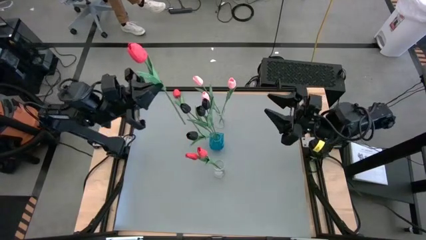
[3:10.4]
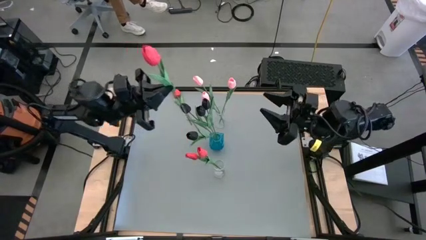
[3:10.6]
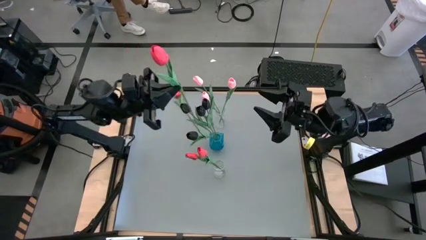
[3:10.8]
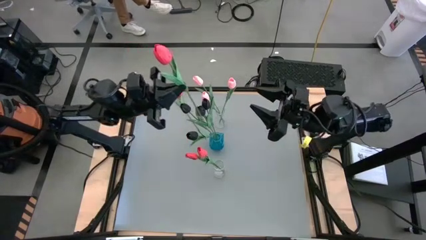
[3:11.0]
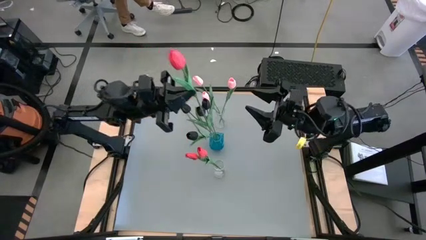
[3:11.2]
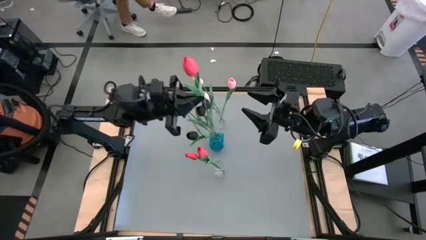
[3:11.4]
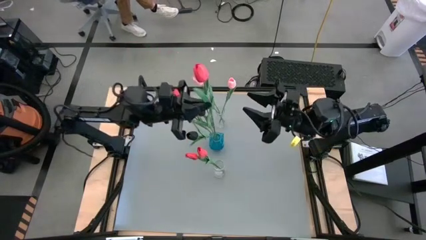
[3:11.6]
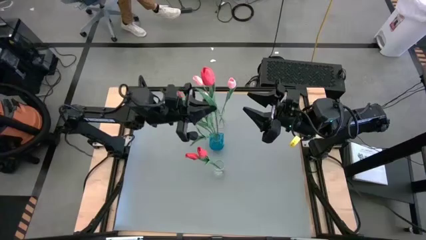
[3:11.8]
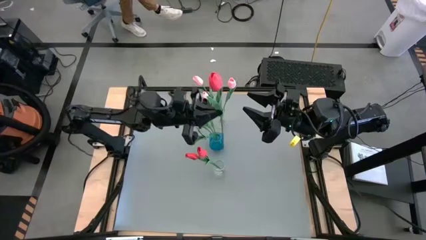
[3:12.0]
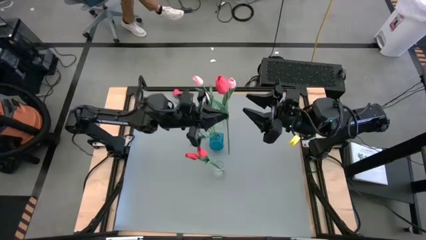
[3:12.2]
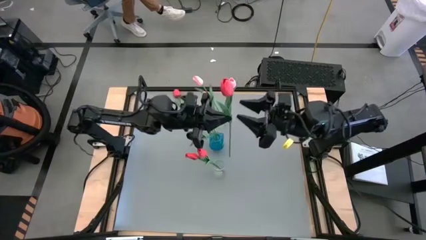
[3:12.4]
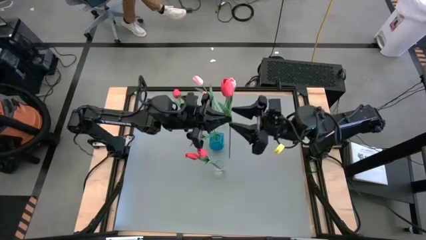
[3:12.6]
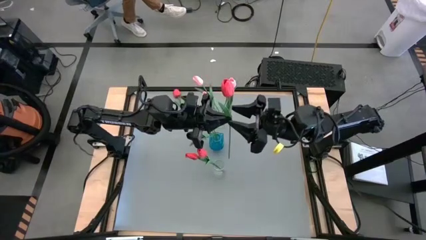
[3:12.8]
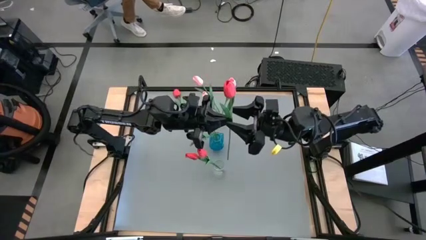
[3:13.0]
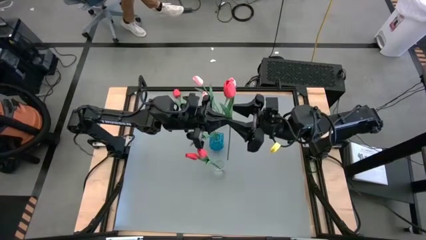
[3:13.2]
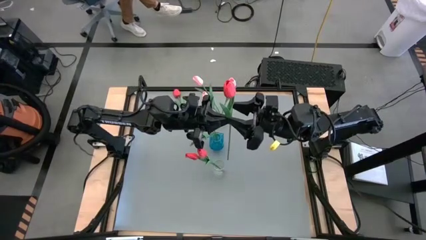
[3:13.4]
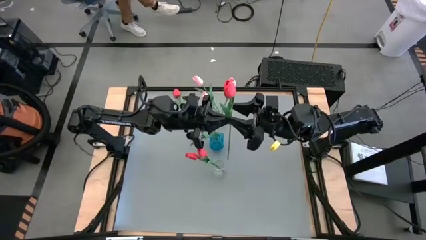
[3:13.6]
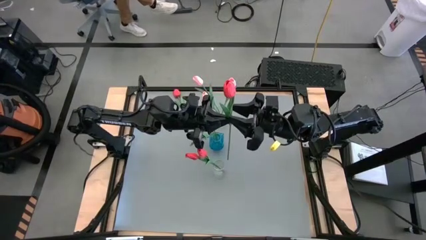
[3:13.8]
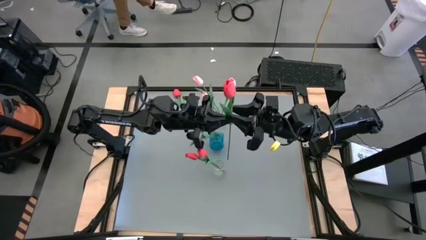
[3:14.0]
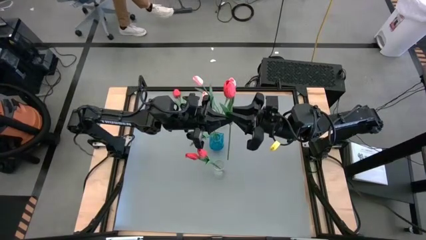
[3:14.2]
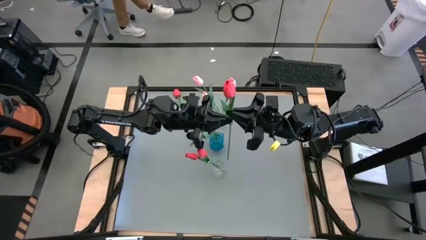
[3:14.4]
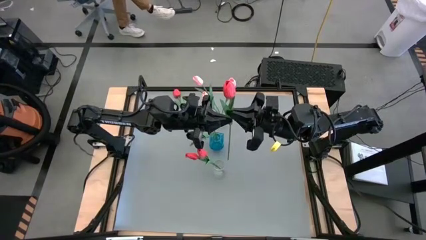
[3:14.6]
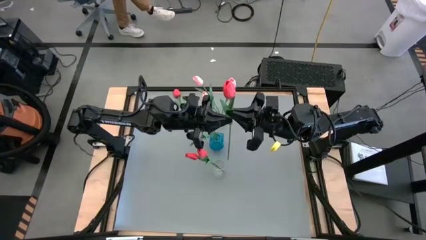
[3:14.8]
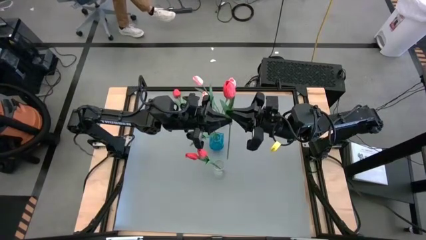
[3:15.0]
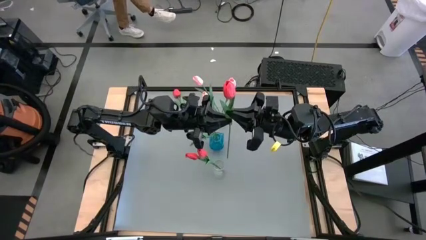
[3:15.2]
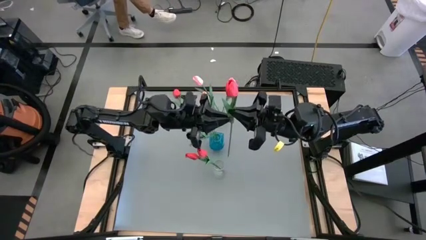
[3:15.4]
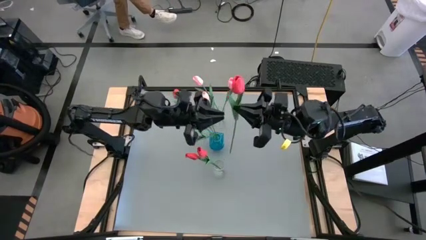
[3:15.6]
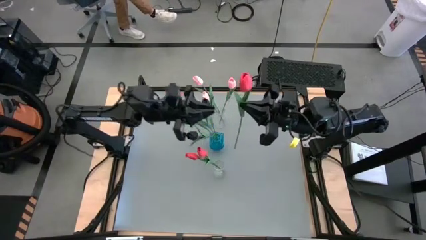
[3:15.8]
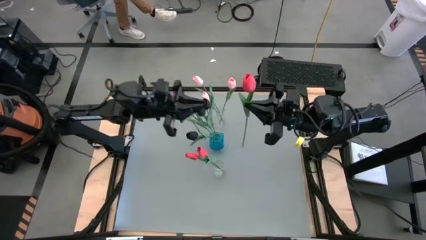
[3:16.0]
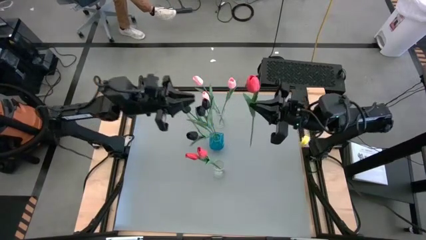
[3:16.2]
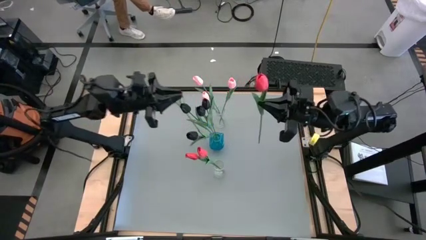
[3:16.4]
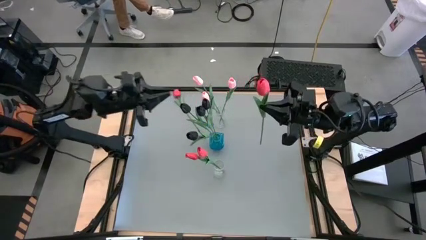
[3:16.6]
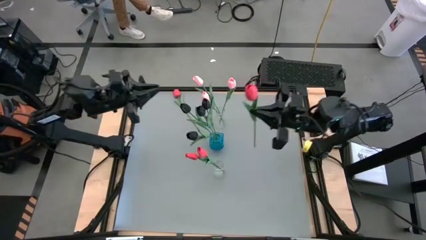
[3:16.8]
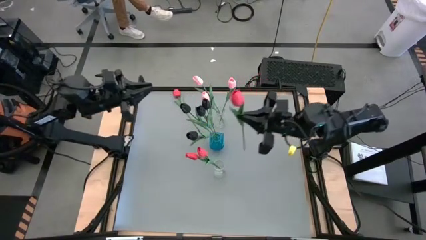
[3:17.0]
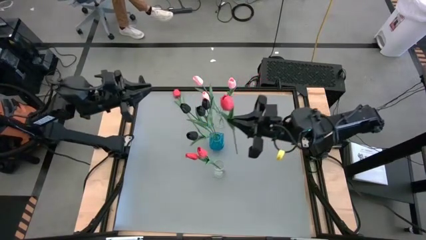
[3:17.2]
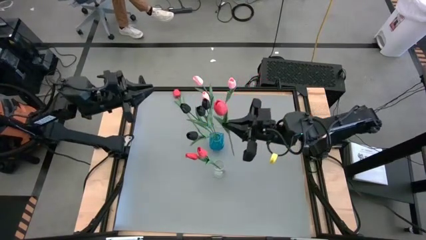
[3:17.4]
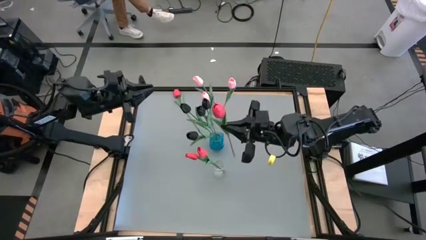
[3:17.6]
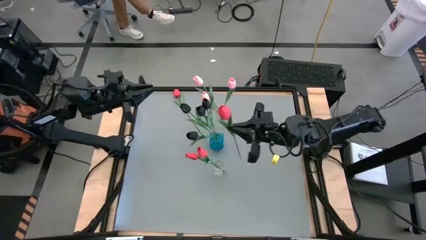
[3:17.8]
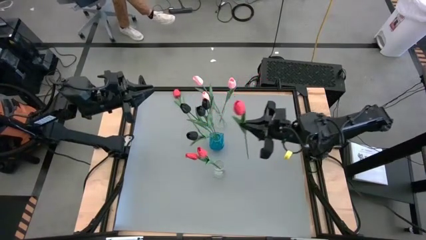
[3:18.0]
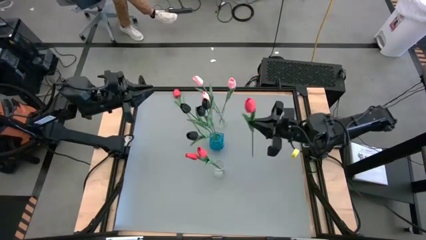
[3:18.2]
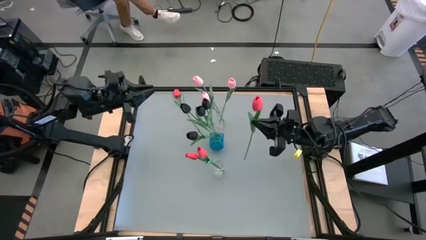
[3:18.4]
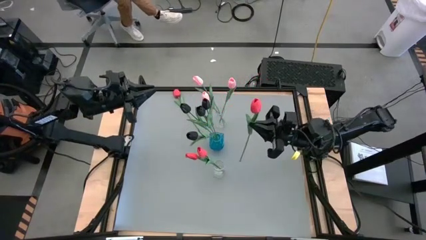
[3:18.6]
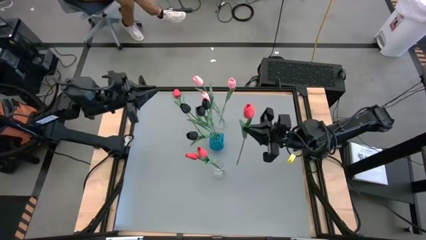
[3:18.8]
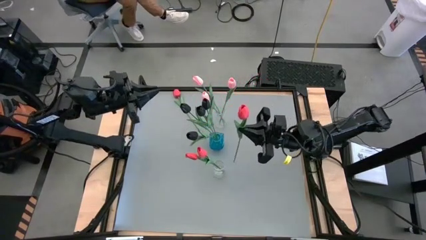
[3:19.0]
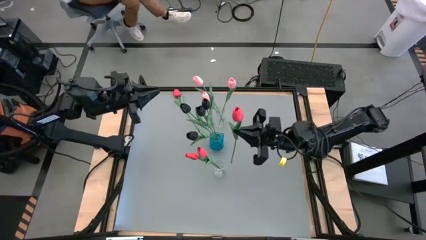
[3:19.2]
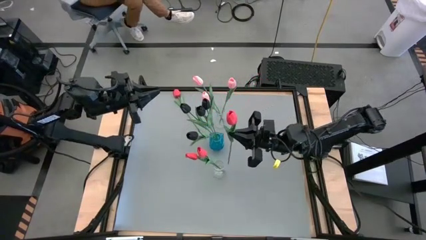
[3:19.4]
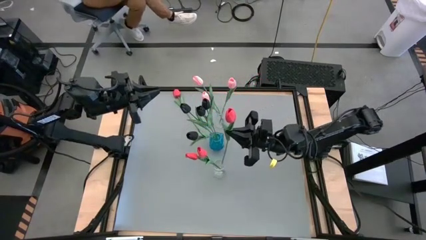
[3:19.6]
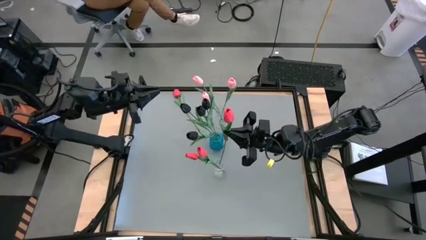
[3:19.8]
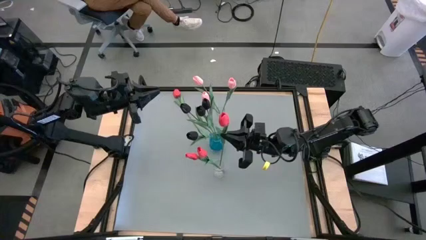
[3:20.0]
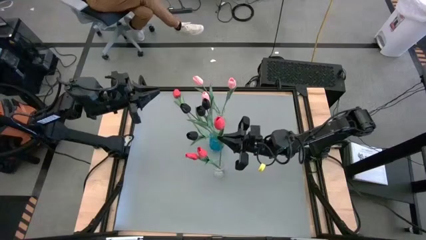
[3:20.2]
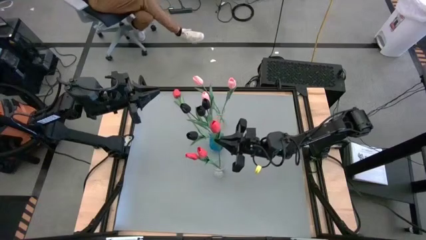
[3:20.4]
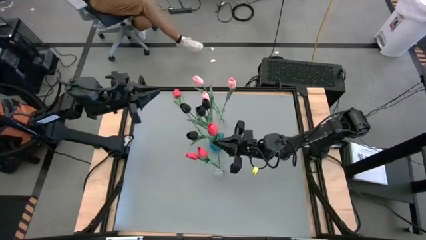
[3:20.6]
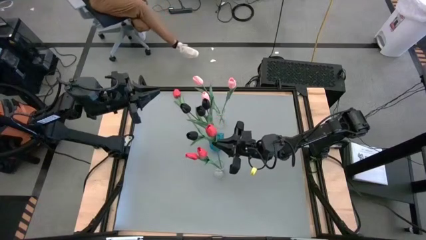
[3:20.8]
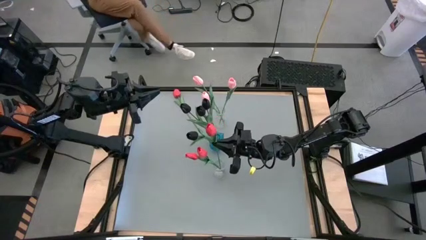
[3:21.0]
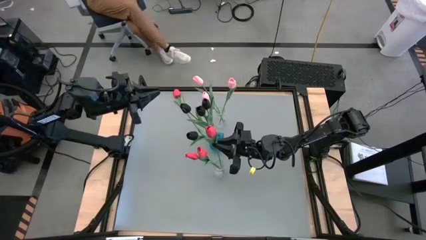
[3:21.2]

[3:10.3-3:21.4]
Task: Sort flowers into vase by color
Put the bottom red tulip into the bottom transparent vase
